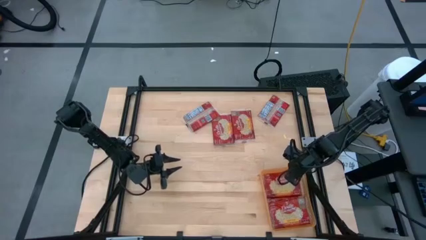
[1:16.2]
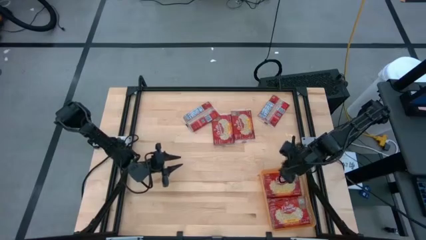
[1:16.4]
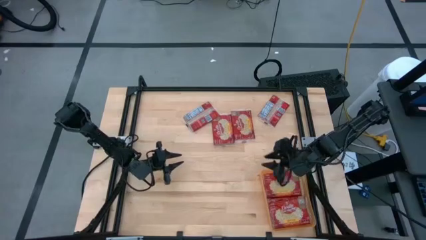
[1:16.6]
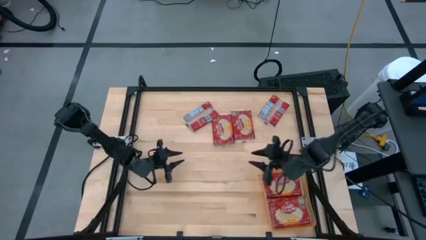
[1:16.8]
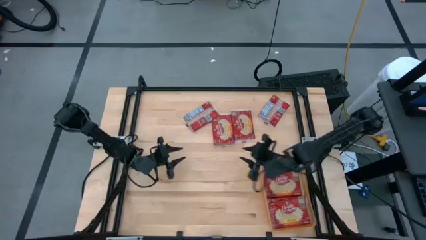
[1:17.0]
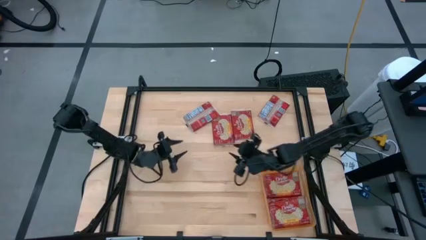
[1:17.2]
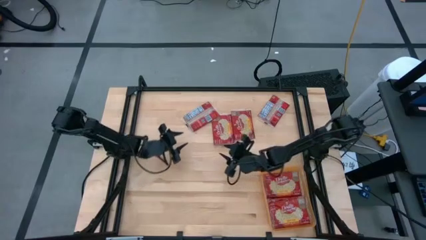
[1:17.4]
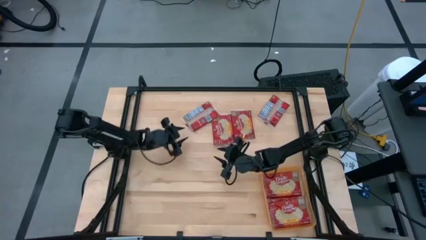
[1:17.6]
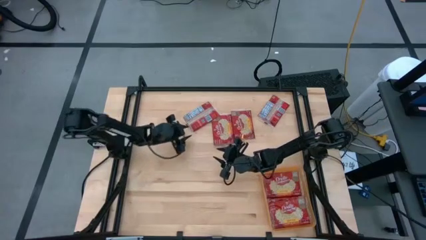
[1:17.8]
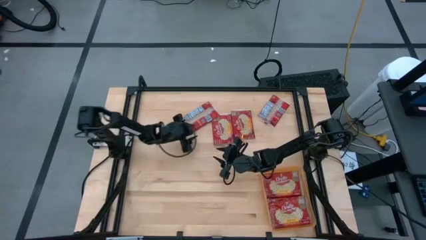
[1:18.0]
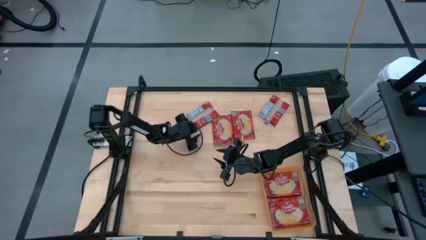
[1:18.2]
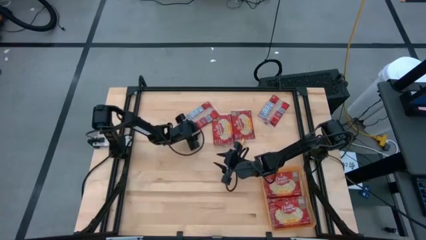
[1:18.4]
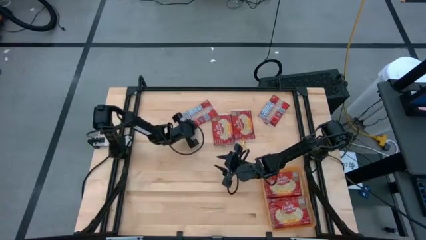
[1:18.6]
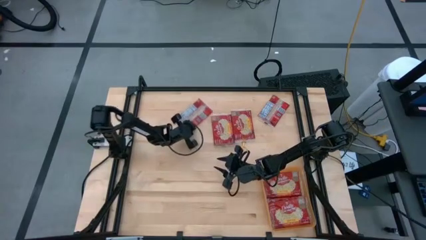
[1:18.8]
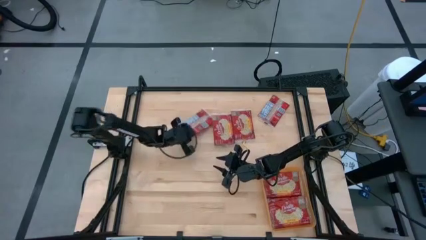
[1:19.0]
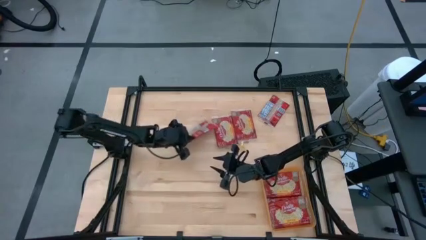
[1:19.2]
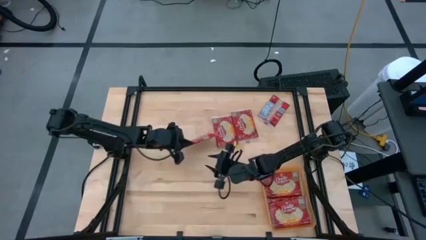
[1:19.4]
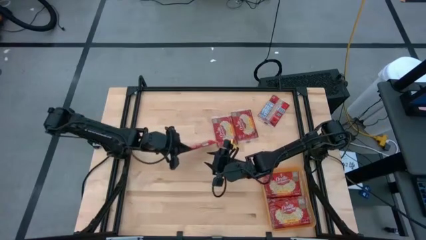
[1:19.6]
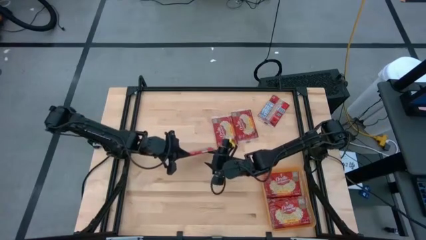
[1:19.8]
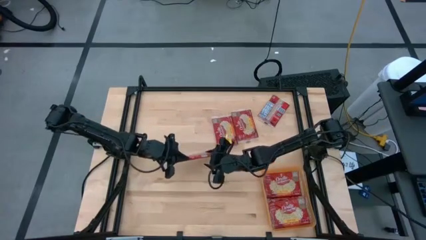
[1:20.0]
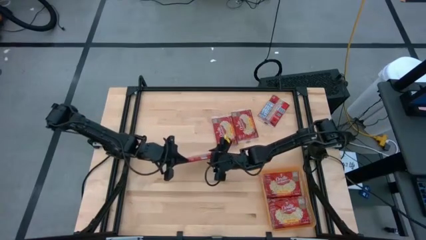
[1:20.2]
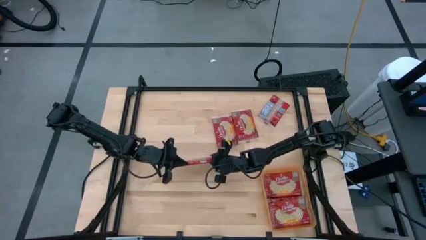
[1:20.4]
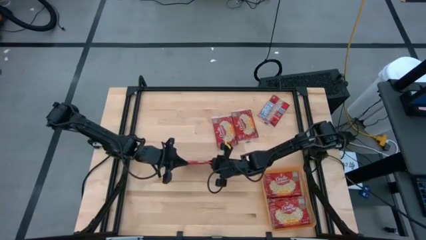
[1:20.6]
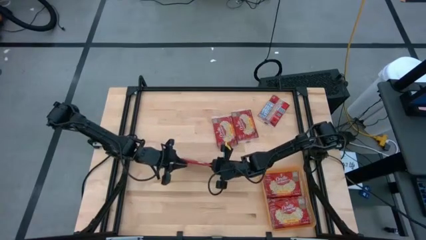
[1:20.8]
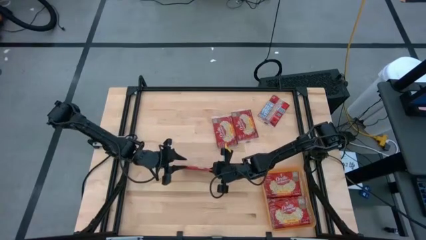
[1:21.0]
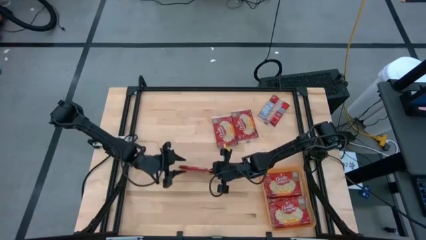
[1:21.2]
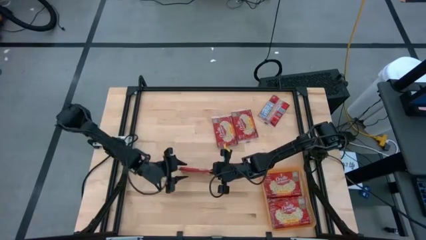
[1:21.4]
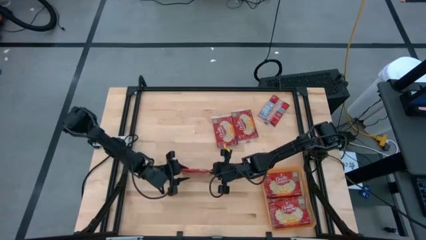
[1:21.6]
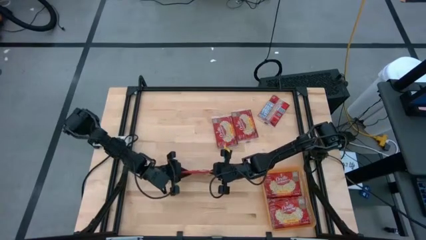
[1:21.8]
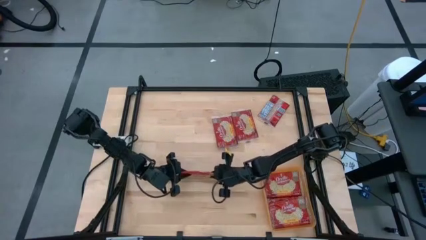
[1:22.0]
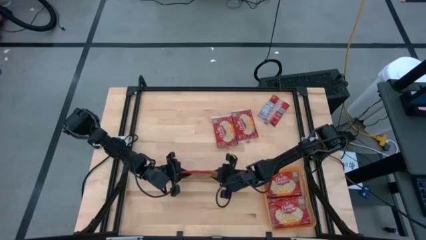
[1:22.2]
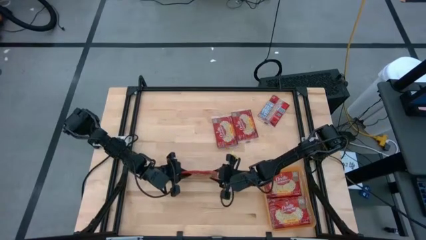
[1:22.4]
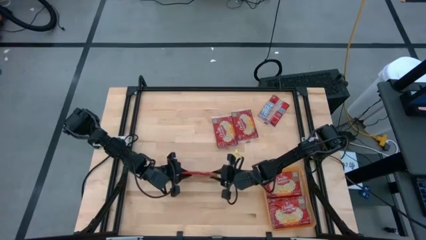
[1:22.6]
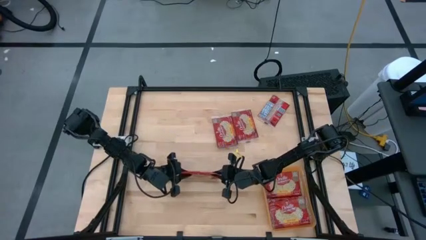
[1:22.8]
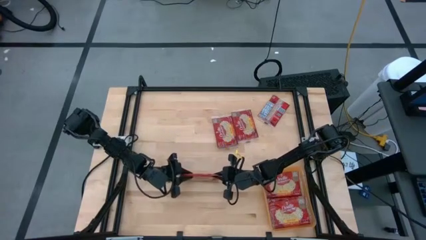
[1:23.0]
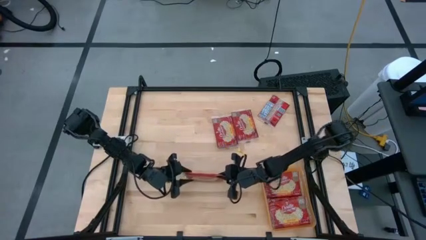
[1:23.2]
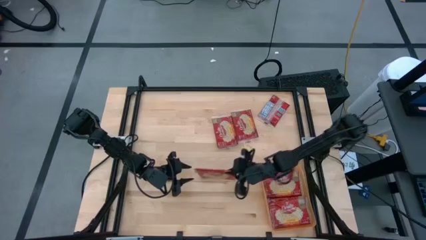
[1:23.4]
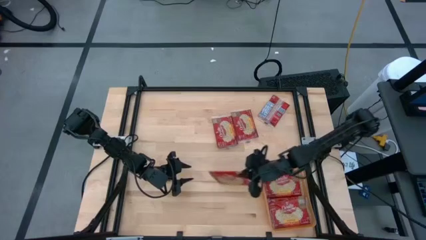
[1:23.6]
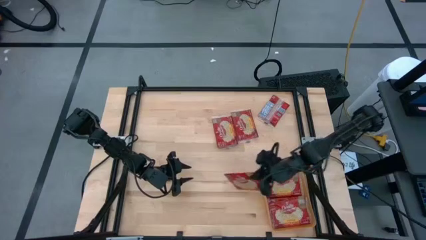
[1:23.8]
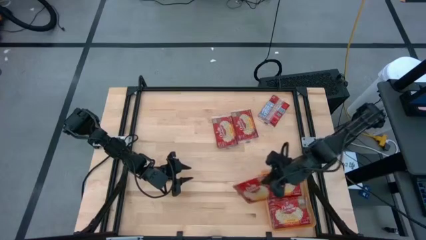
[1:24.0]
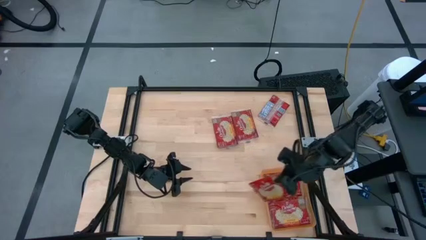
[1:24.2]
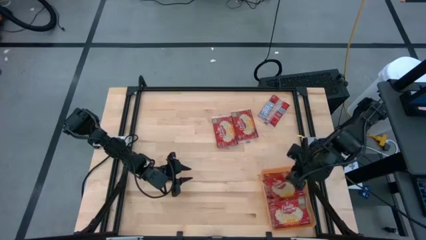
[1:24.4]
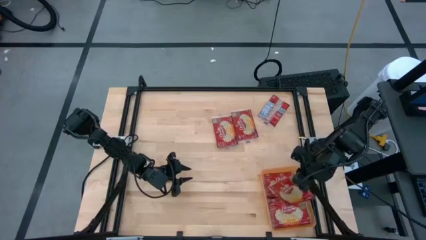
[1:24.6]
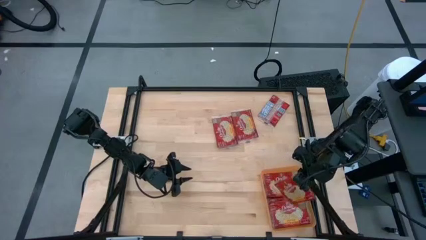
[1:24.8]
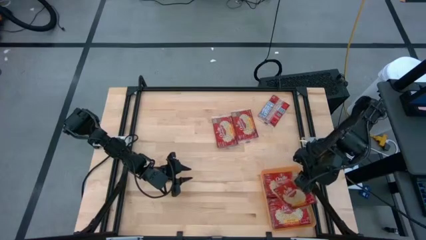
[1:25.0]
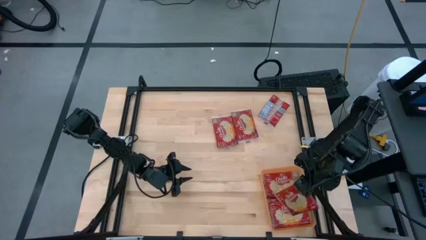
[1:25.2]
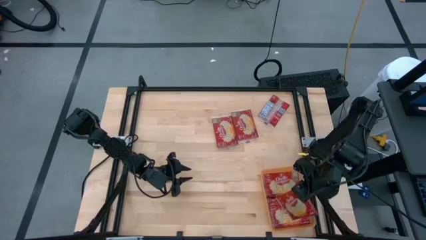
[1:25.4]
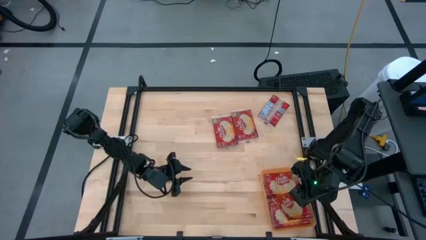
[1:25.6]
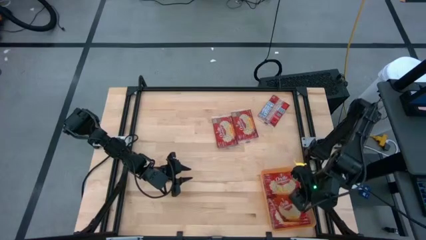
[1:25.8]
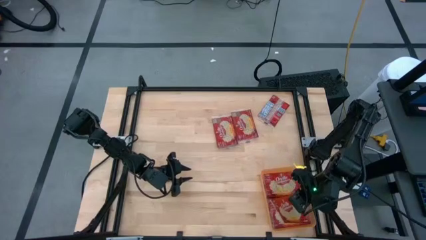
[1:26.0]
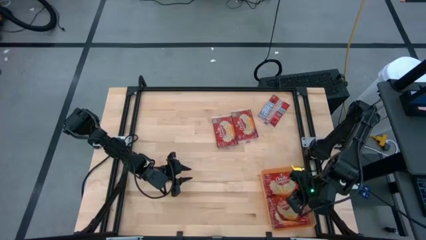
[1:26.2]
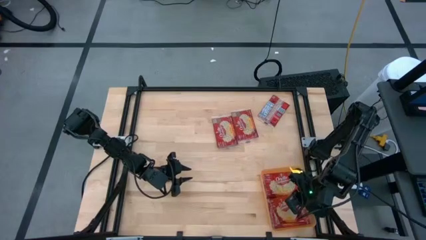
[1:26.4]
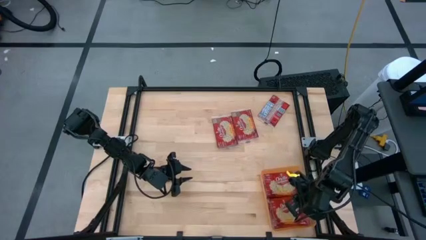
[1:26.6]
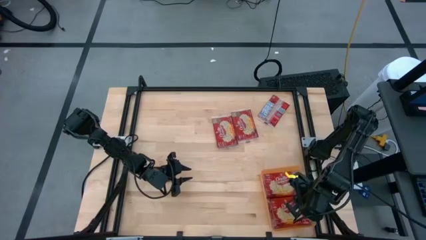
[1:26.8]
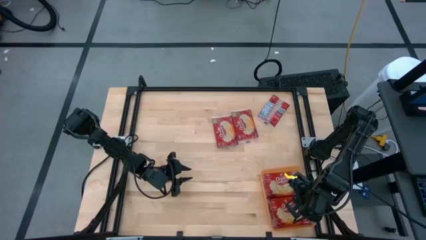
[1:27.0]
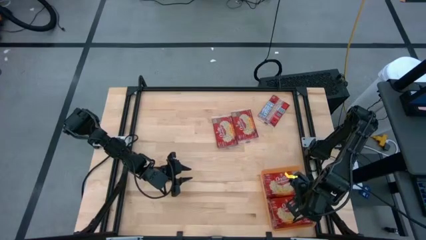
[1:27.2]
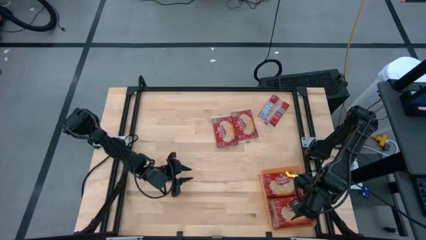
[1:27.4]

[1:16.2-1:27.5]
Task: Sort popcorn bags into baskets
Put the popcorn pack into the orange bin

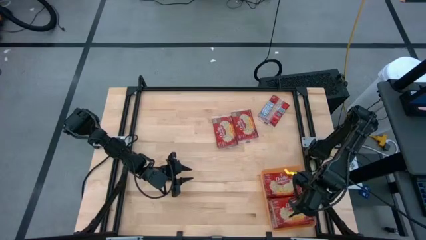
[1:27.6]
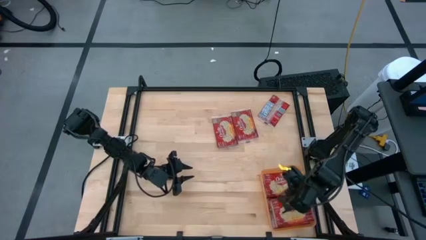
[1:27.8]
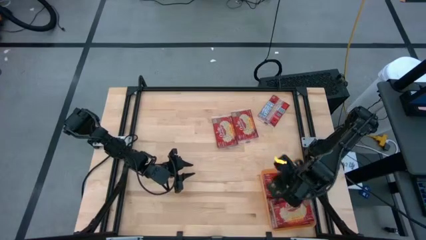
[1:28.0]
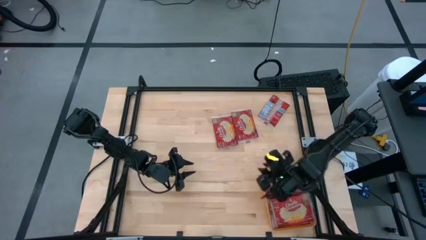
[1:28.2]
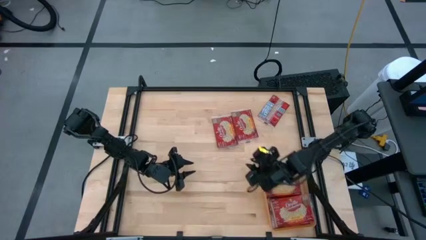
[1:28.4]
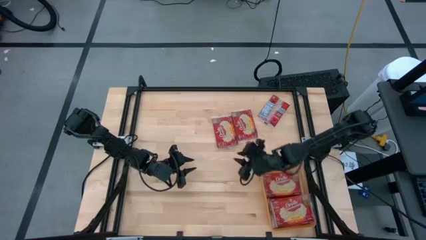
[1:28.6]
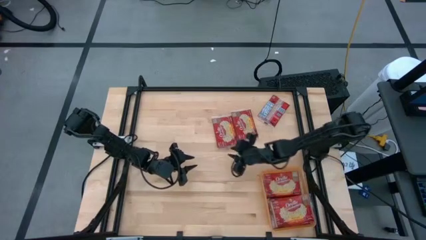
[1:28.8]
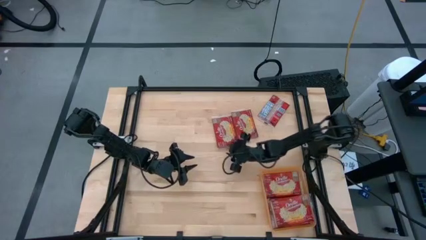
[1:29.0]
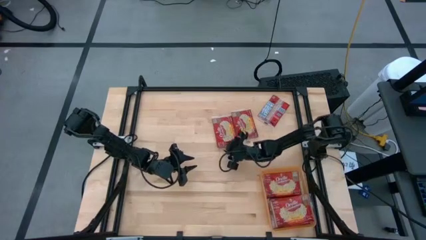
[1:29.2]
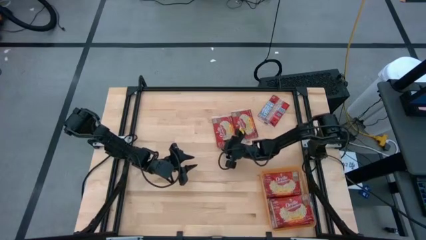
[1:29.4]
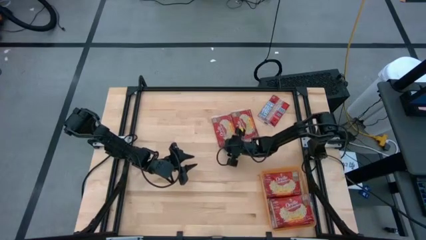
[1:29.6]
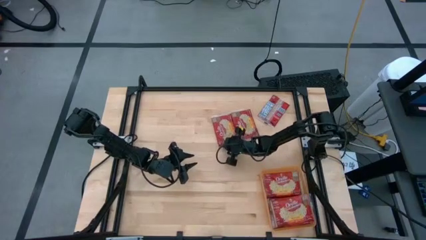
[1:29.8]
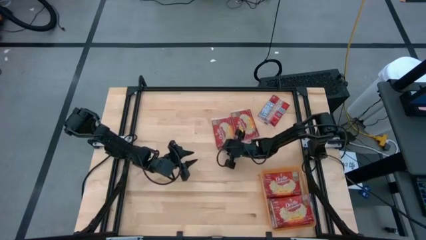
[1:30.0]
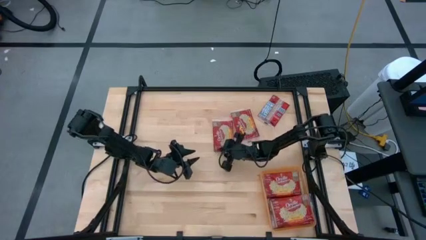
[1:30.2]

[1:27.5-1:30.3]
Put the popcorn pack into the orange bin

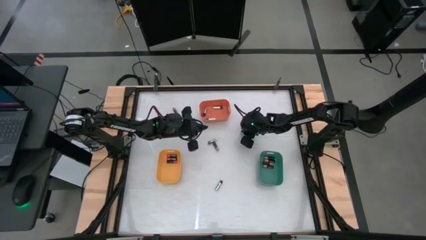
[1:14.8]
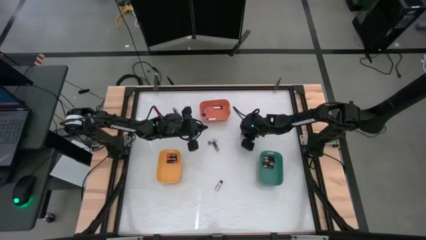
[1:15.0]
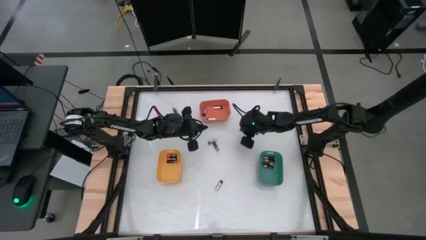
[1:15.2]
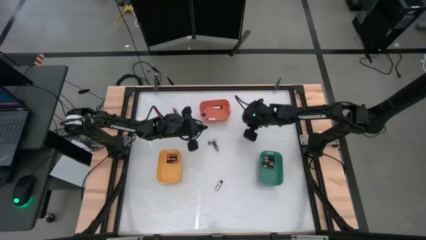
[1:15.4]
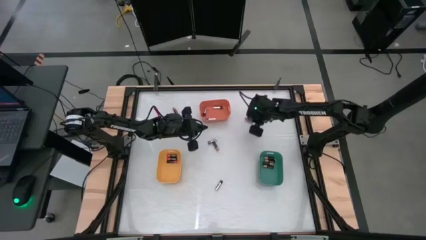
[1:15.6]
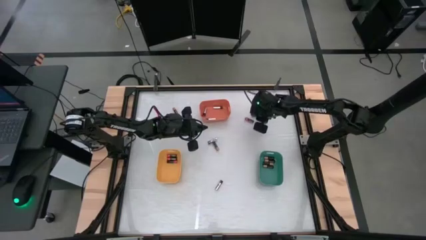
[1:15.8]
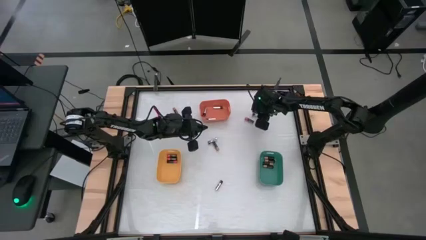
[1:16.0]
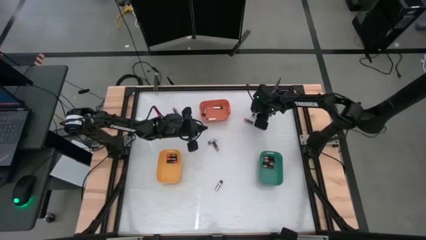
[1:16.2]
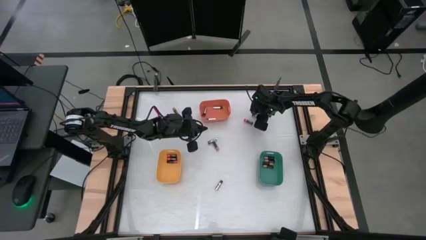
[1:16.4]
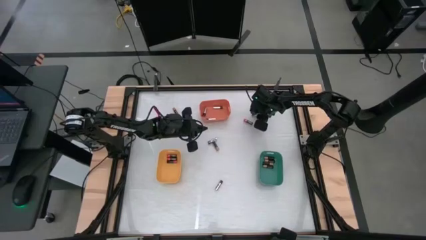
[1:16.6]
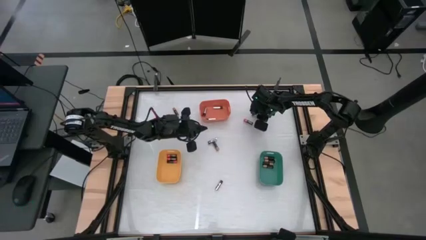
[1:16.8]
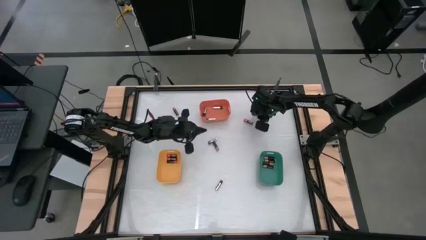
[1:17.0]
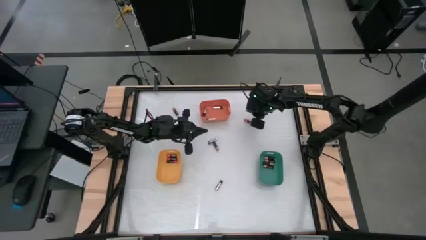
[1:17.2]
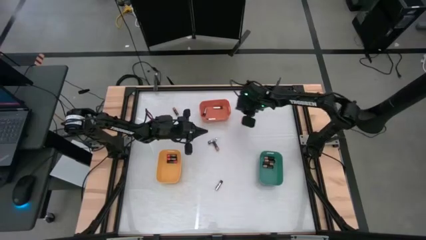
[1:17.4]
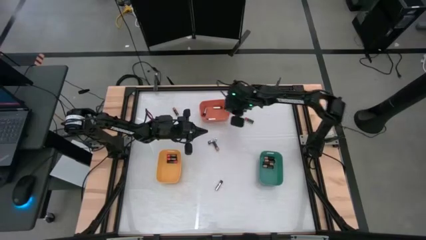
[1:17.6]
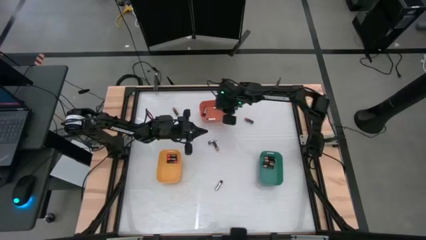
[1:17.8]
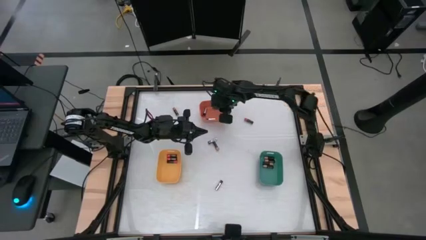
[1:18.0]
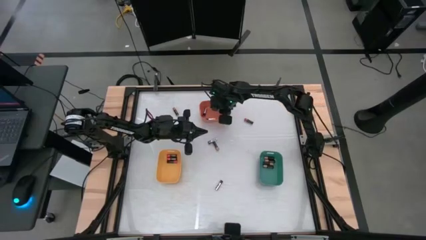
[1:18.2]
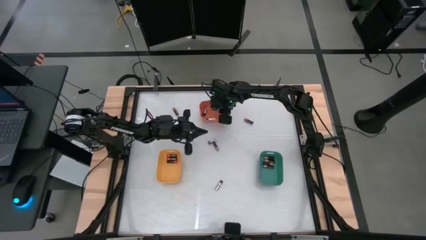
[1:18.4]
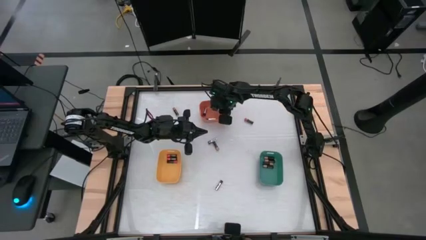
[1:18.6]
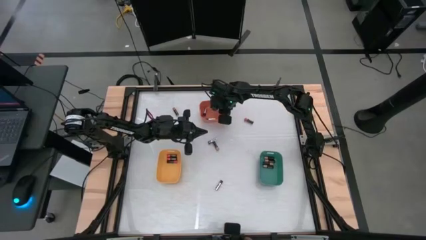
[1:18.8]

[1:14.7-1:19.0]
Task: Sort batteries
Put the silver battery into the orange bin
